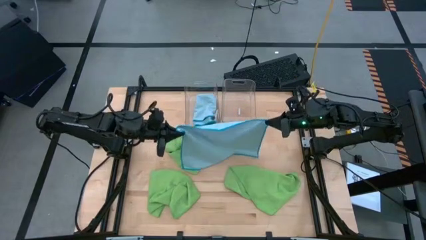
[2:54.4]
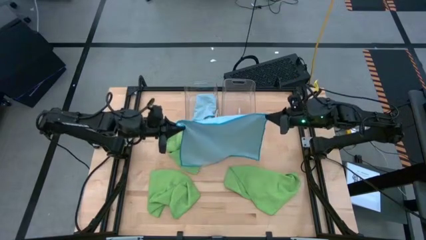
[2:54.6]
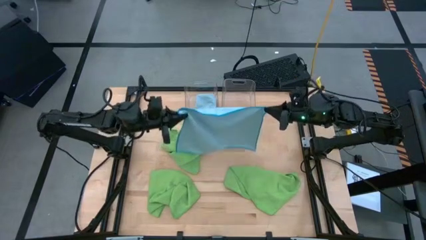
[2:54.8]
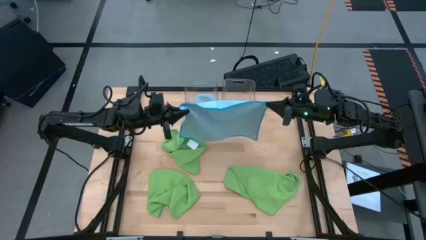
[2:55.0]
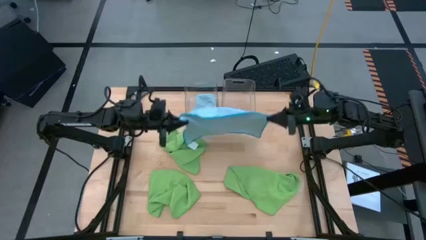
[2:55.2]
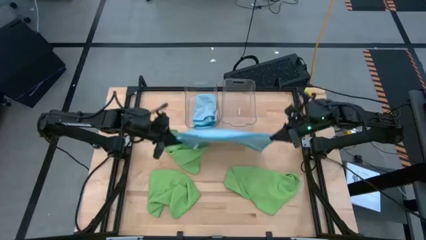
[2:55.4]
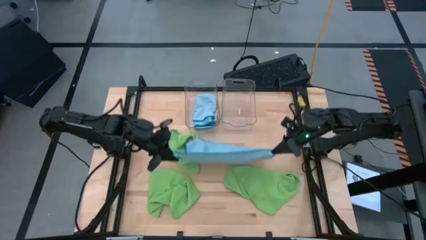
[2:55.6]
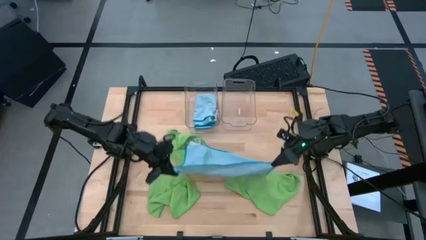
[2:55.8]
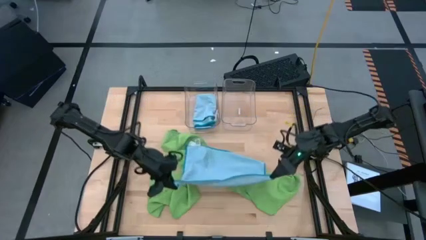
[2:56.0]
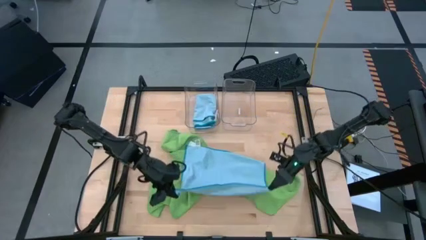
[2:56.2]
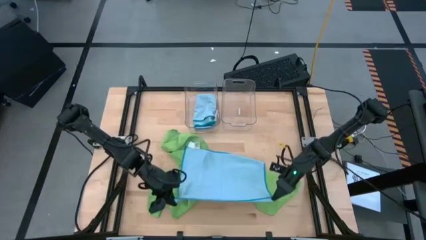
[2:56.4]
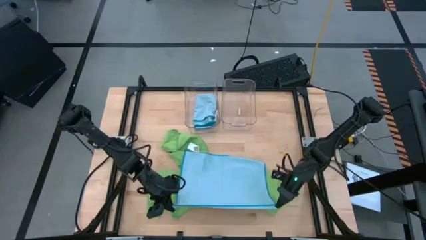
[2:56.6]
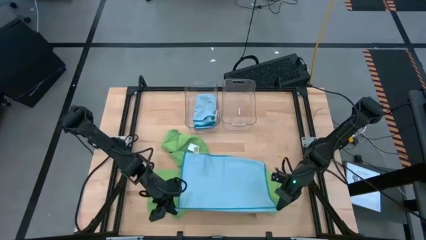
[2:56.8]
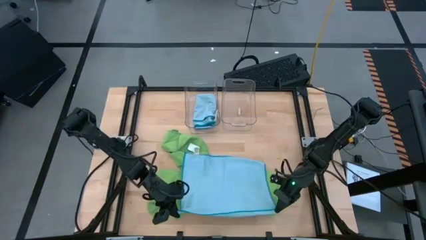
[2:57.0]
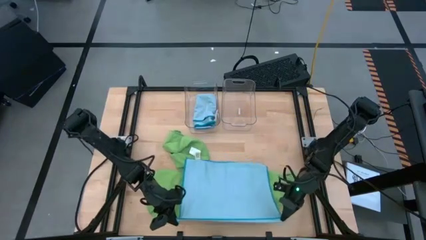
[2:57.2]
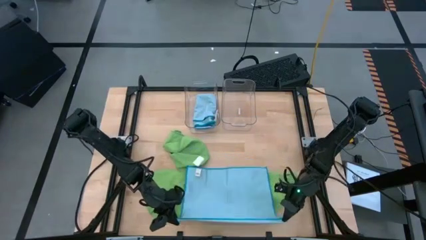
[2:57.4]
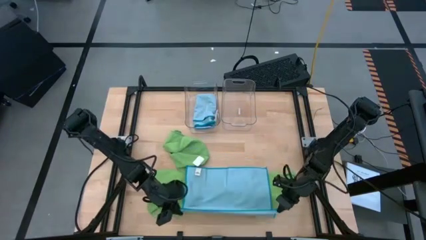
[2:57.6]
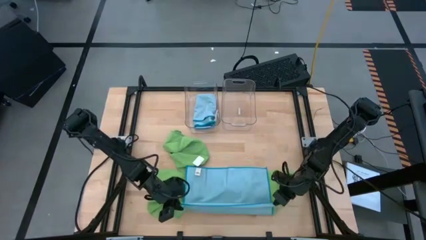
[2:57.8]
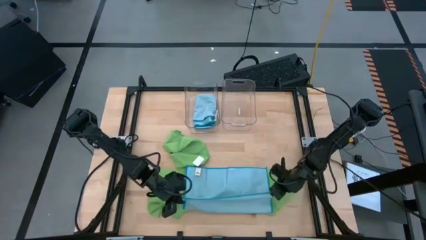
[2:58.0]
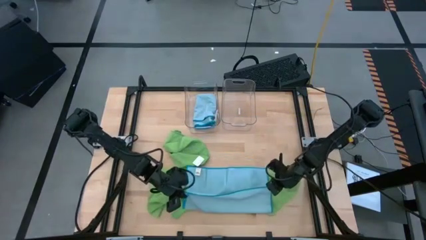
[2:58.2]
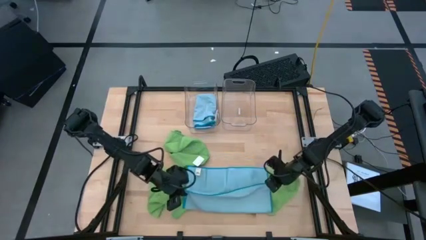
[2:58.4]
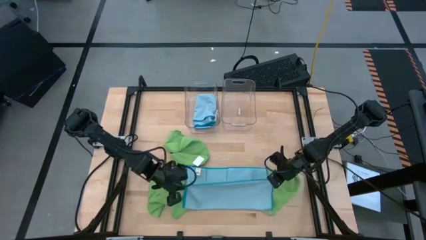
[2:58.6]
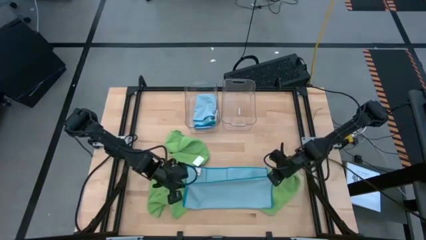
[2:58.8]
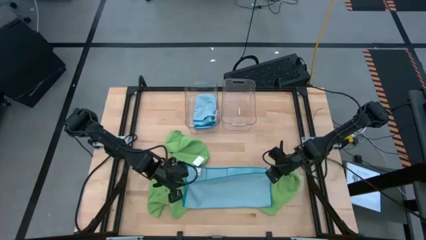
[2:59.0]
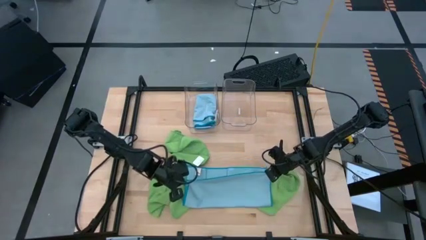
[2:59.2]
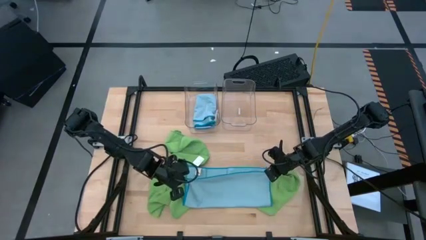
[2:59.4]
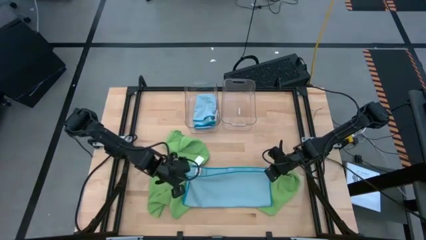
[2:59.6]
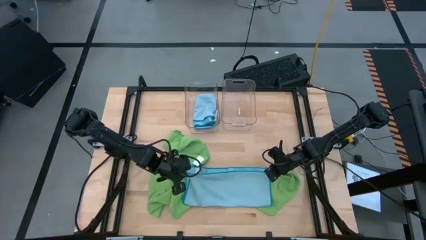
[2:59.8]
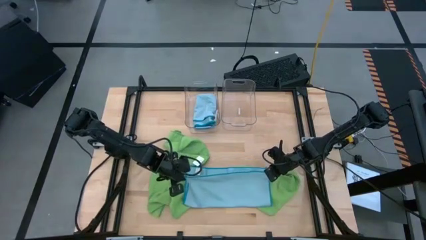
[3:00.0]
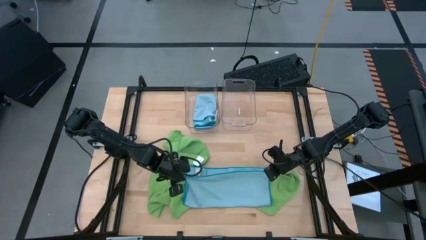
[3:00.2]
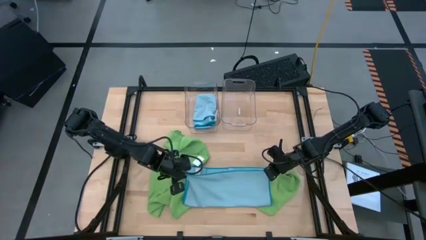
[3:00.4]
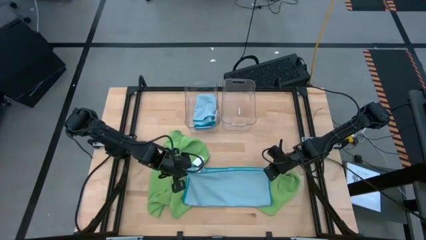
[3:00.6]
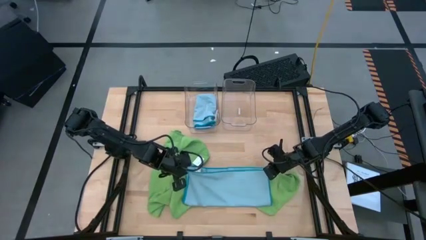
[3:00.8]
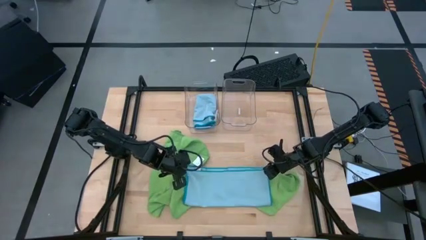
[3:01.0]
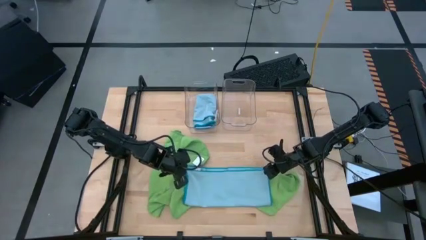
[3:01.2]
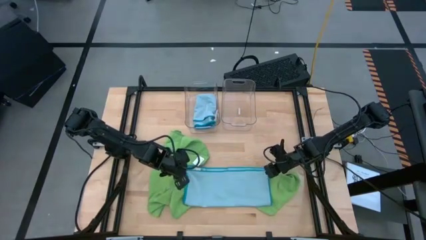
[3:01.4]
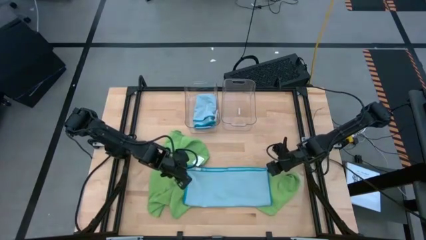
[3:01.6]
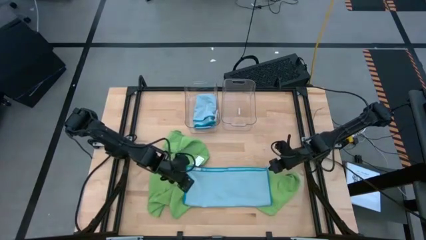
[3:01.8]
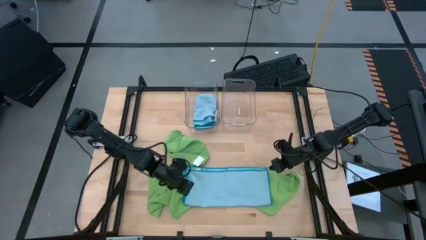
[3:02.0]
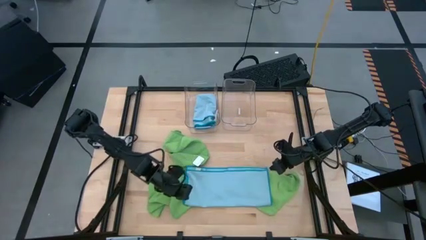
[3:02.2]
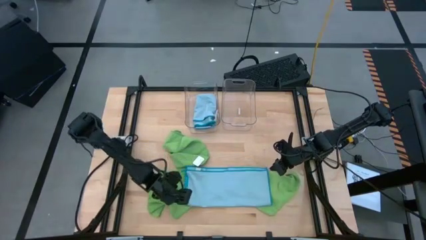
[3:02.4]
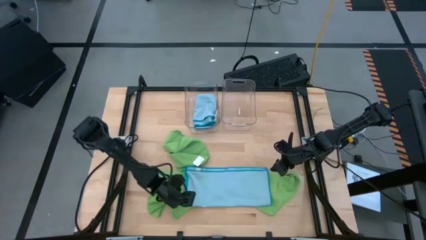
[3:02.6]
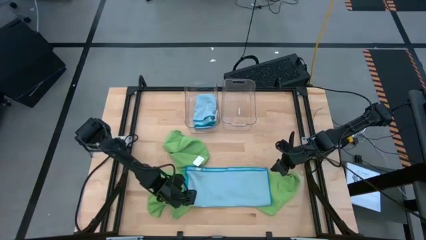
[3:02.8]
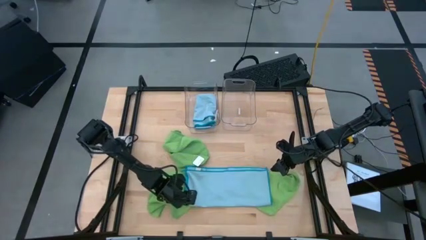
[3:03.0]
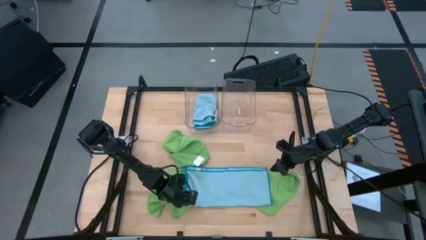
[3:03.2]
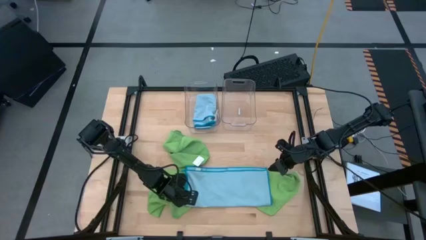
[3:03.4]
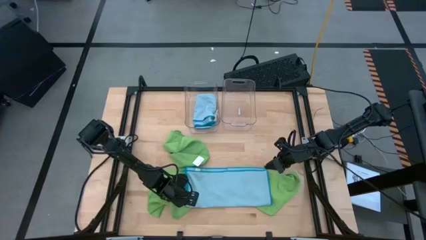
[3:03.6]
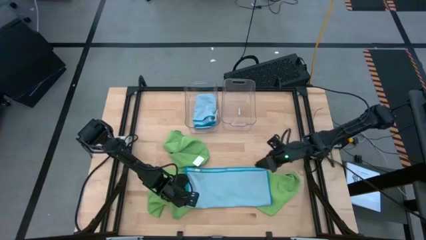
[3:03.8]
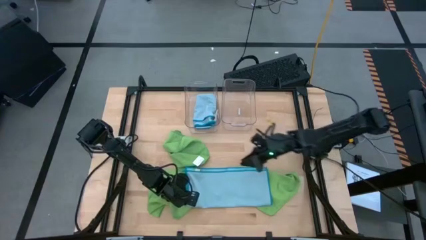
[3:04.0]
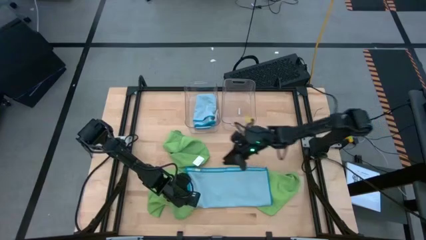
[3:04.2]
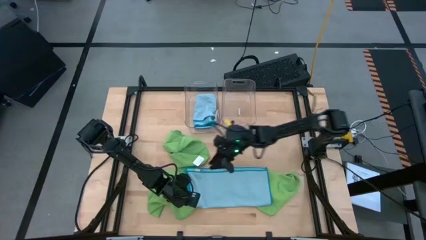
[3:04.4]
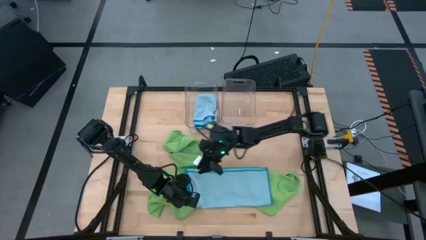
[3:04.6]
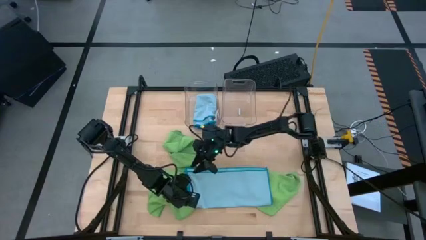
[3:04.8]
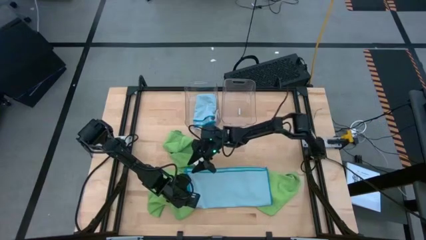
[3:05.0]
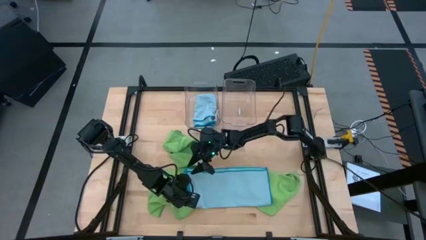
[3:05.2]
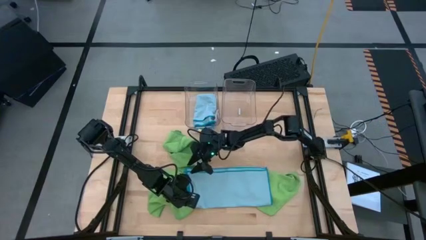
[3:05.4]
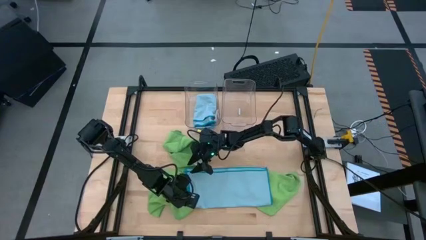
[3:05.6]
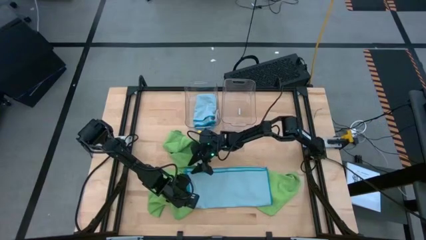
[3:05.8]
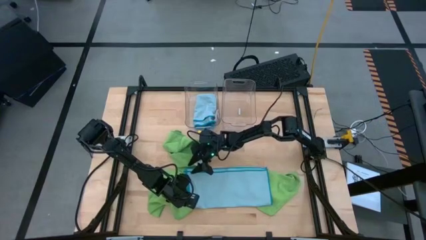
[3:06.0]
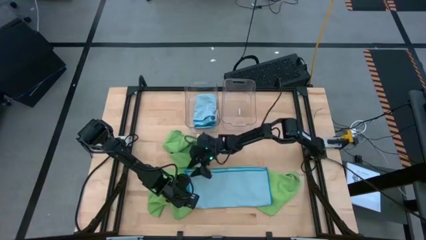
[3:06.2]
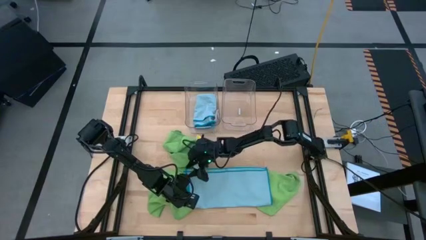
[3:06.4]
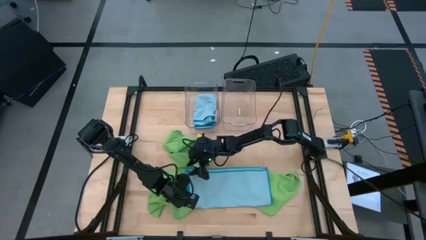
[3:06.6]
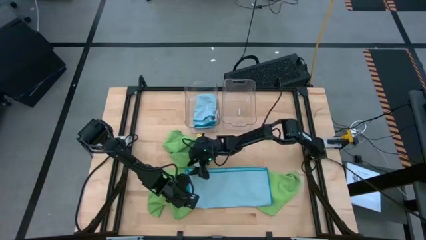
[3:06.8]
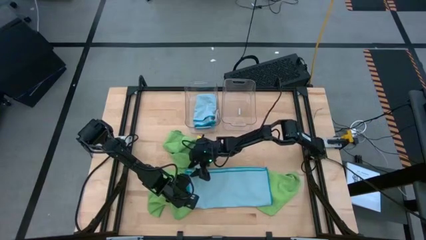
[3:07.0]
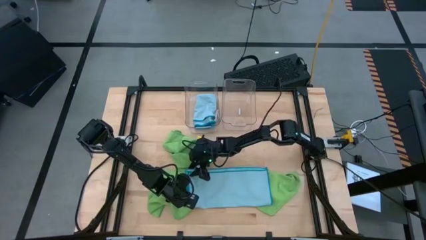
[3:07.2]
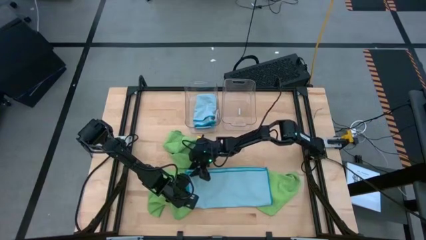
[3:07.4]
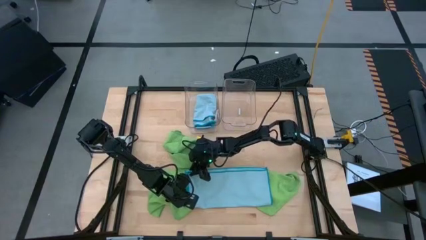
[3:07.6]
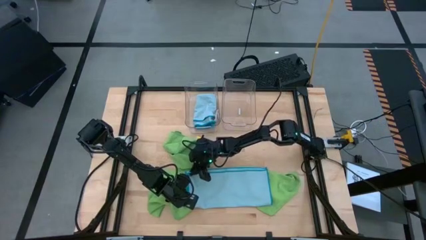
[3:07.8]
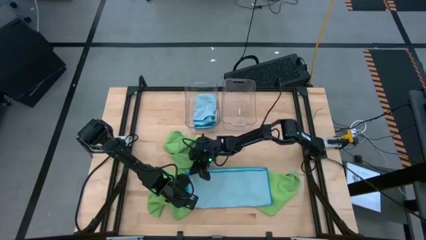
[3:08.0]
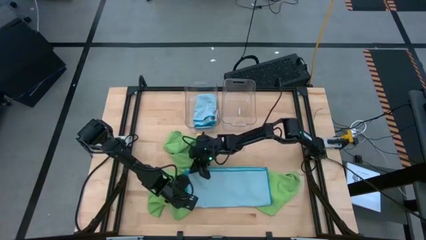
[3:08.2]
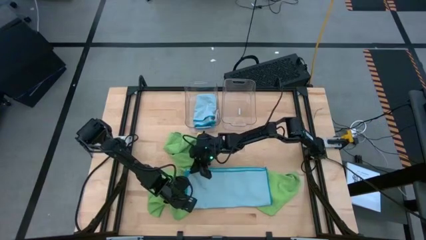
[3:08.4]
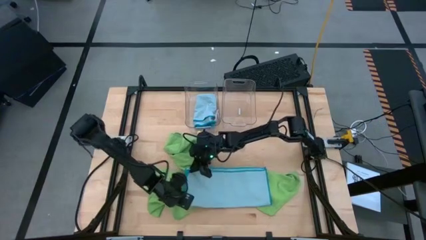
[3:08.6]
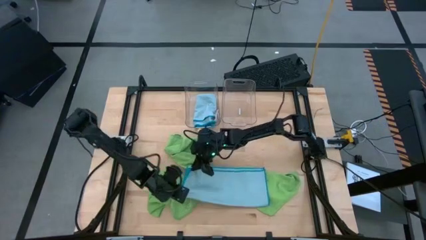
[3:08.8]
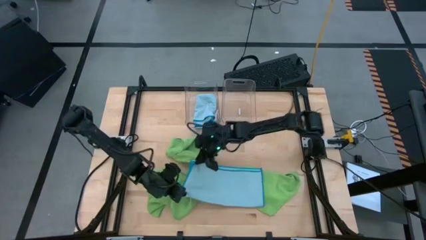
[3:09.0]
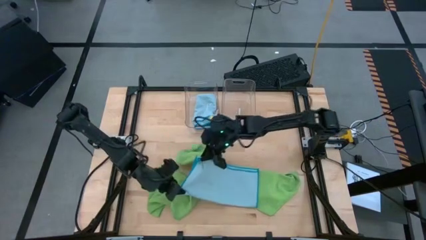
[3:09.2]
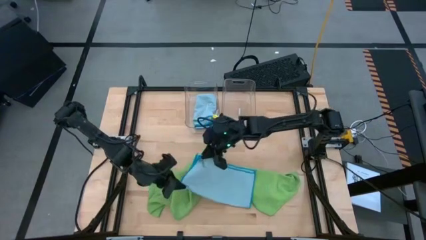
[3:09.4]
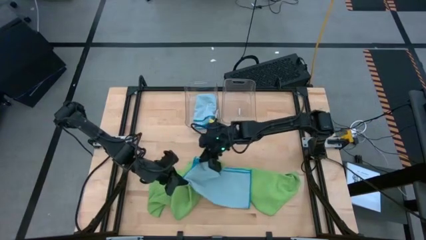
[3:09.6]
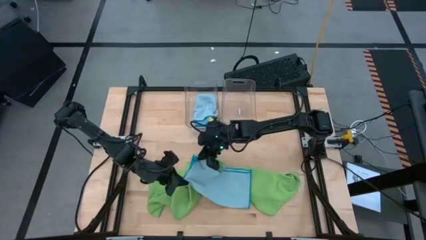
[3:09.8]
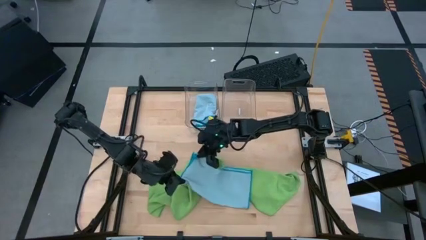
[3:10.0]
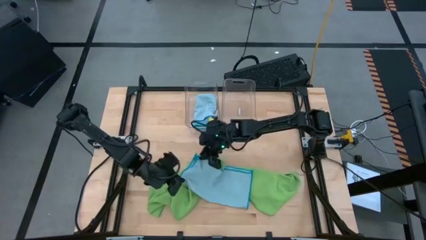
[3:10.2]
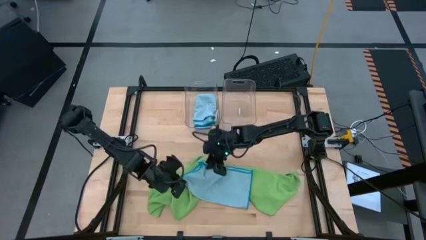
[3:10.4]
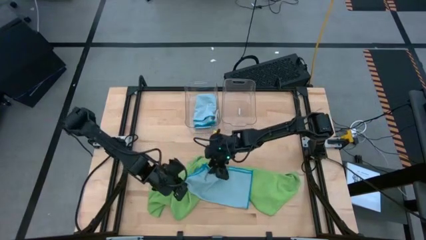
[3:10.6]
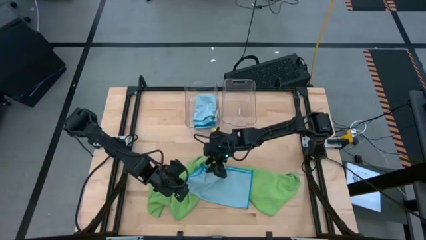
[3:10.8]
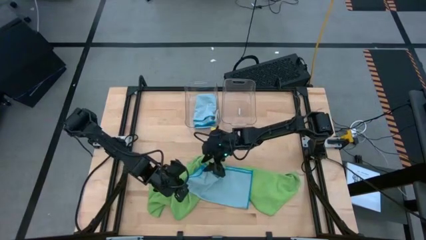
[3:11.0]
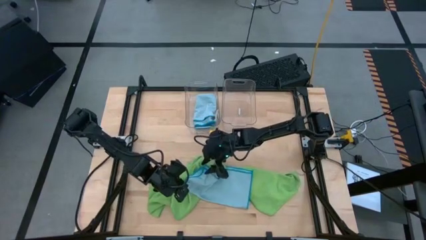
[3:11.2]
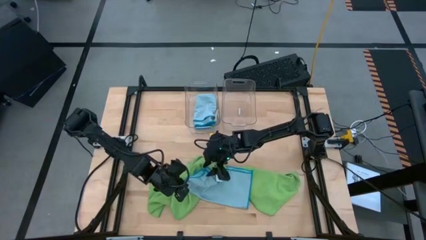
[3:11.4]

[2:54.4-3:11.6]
Task: Fold microfiber towels
Fold the blue microfiber towel
